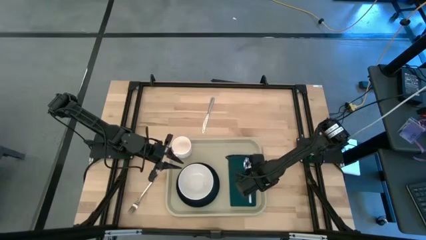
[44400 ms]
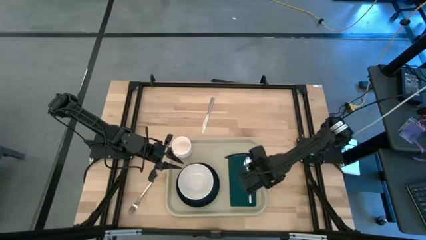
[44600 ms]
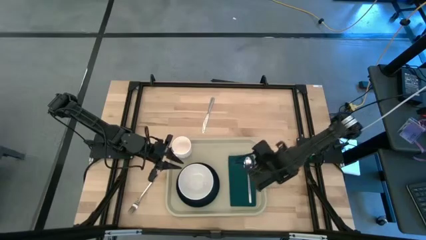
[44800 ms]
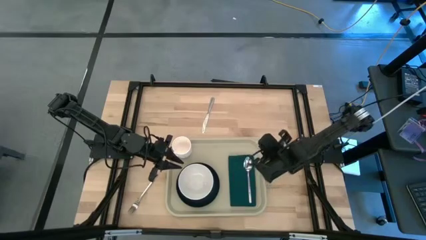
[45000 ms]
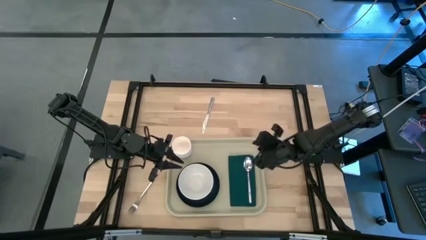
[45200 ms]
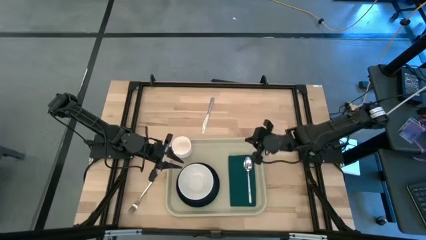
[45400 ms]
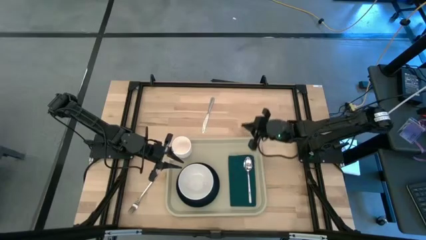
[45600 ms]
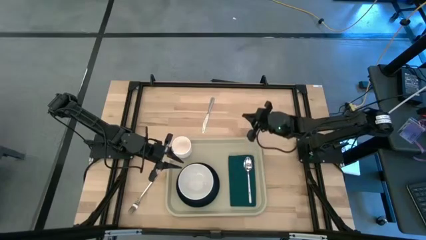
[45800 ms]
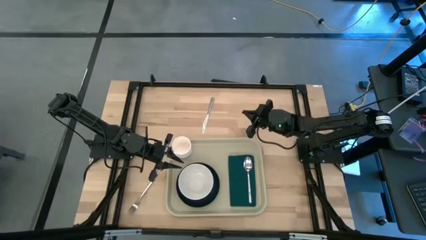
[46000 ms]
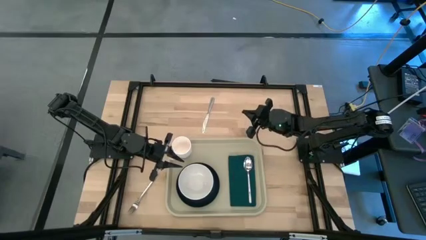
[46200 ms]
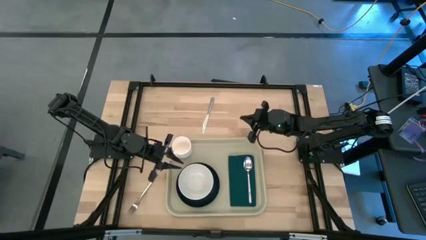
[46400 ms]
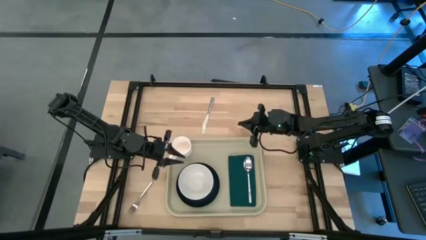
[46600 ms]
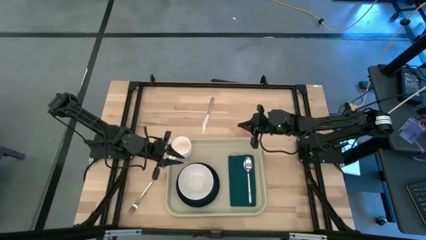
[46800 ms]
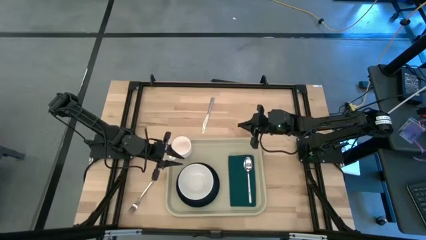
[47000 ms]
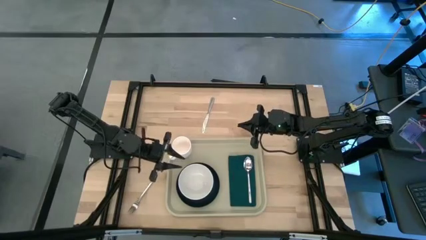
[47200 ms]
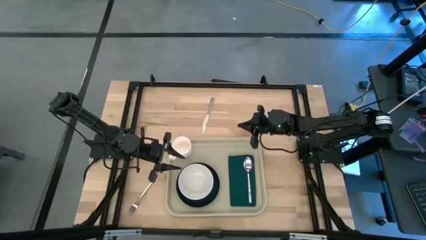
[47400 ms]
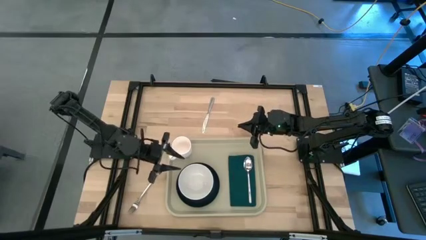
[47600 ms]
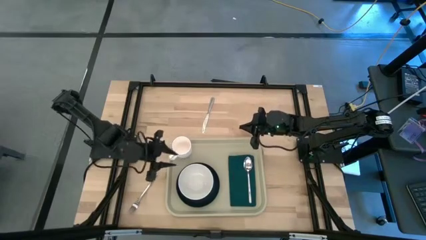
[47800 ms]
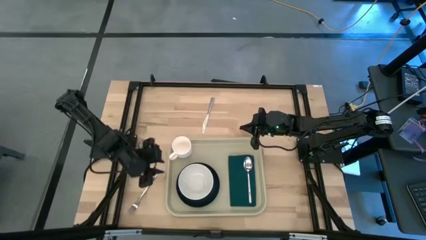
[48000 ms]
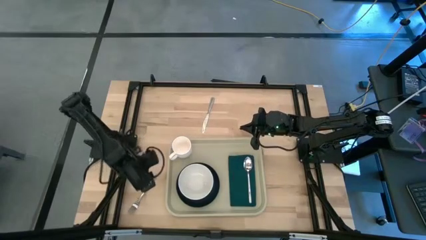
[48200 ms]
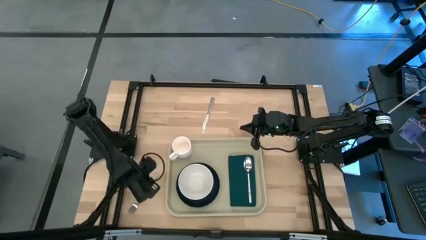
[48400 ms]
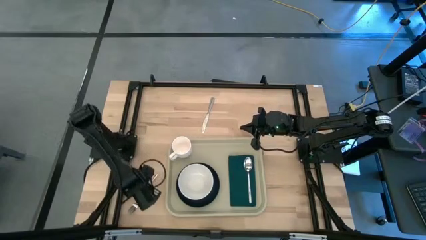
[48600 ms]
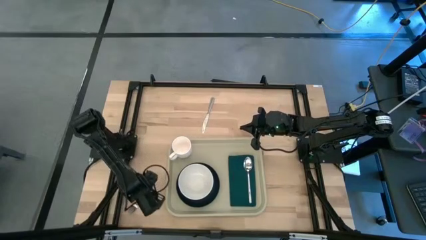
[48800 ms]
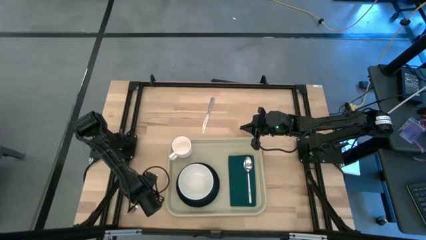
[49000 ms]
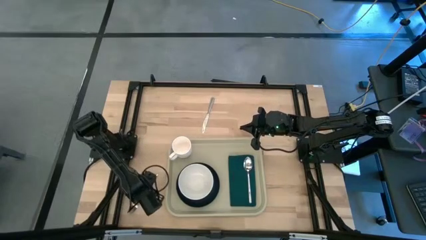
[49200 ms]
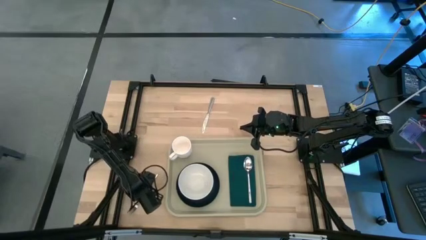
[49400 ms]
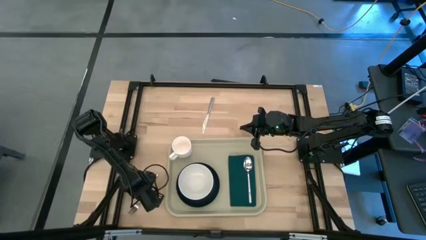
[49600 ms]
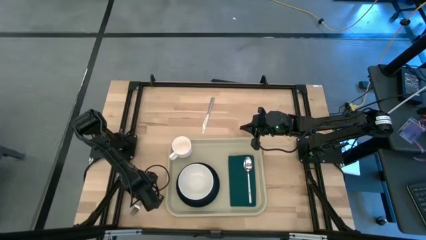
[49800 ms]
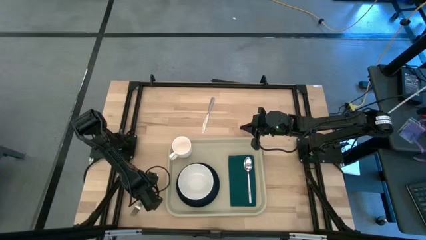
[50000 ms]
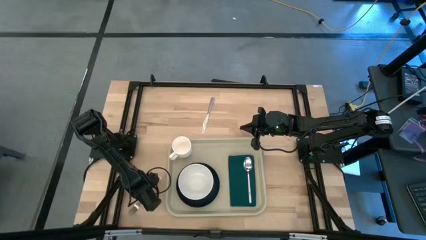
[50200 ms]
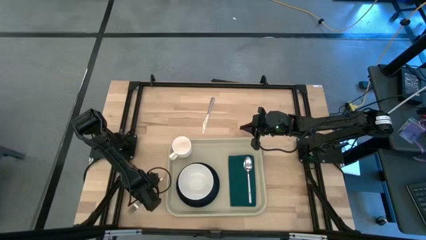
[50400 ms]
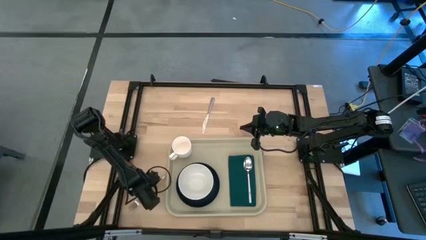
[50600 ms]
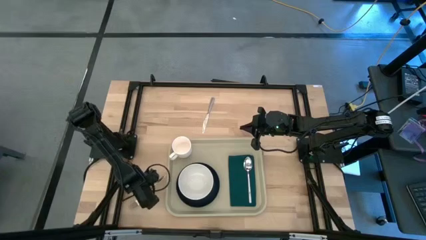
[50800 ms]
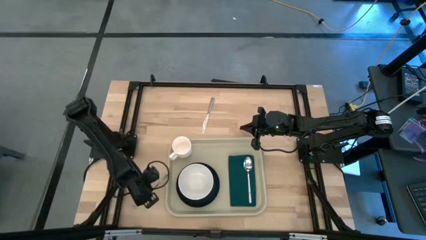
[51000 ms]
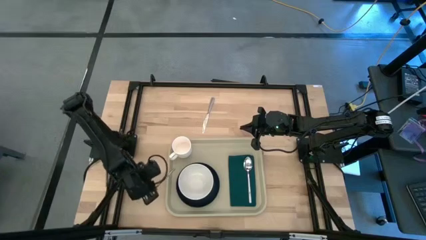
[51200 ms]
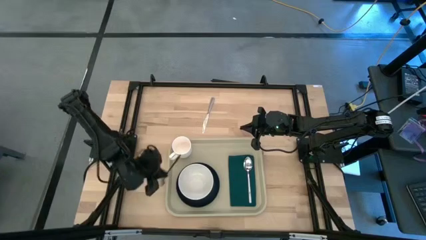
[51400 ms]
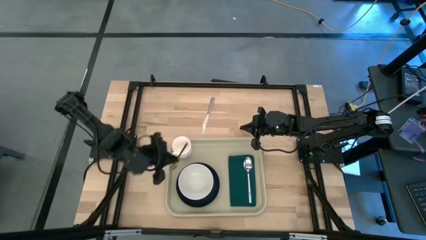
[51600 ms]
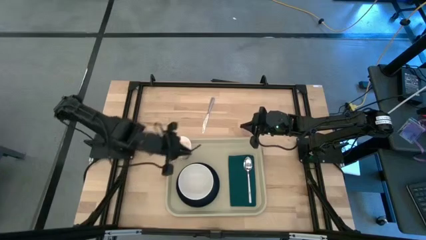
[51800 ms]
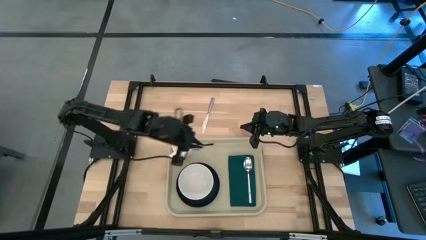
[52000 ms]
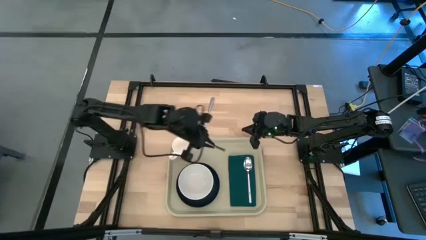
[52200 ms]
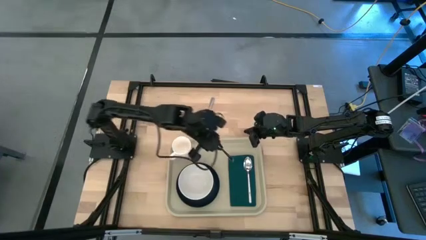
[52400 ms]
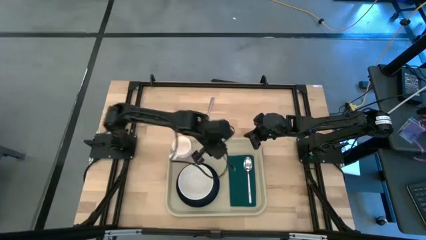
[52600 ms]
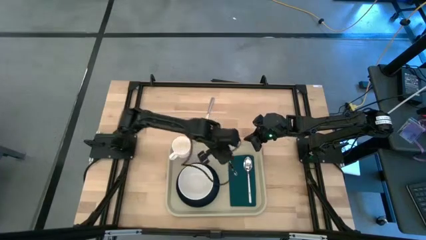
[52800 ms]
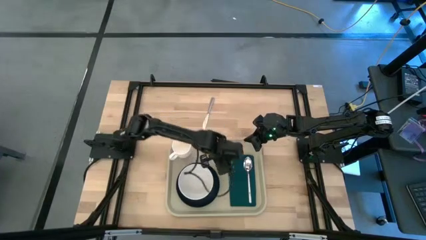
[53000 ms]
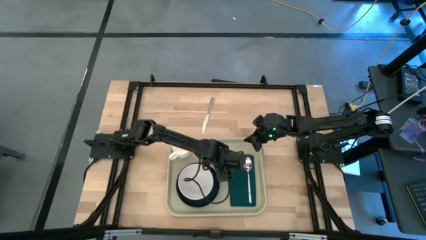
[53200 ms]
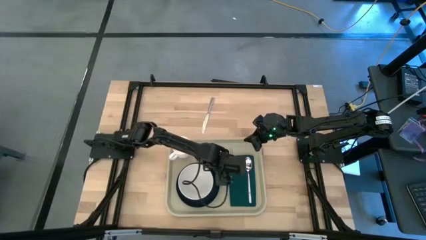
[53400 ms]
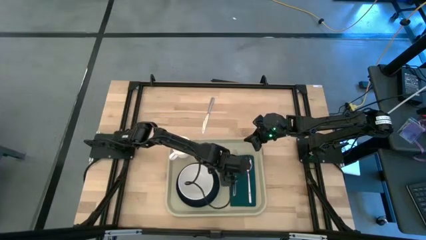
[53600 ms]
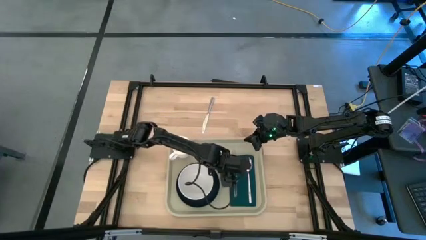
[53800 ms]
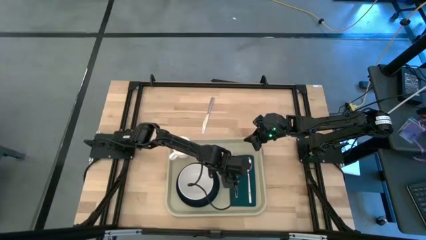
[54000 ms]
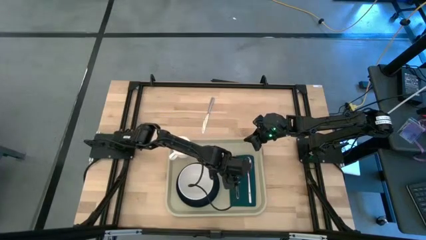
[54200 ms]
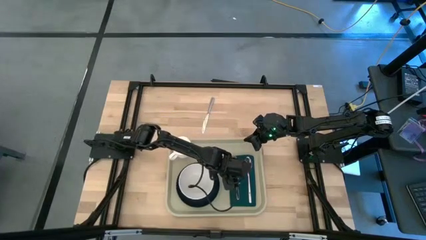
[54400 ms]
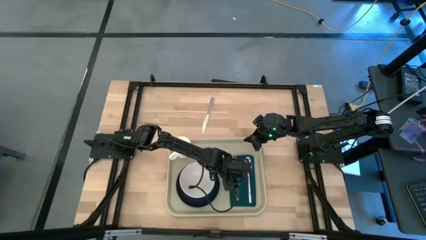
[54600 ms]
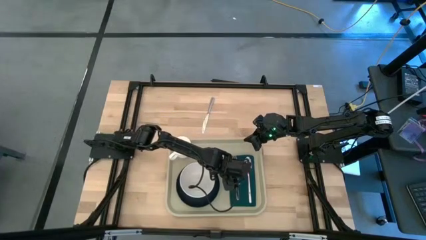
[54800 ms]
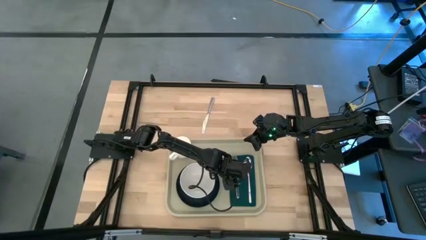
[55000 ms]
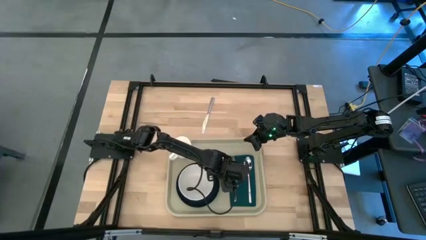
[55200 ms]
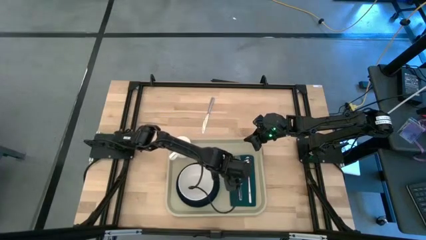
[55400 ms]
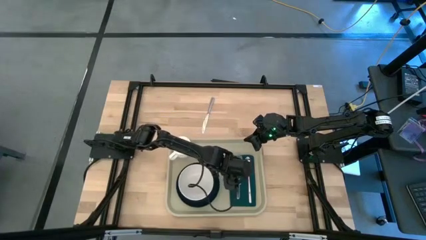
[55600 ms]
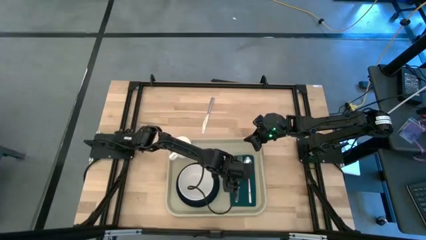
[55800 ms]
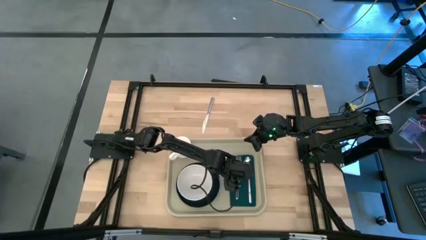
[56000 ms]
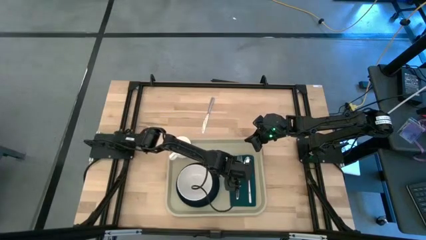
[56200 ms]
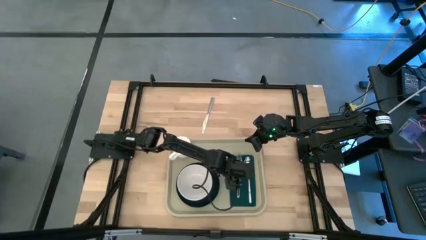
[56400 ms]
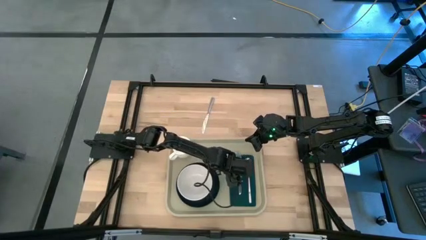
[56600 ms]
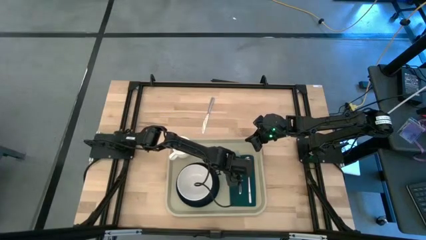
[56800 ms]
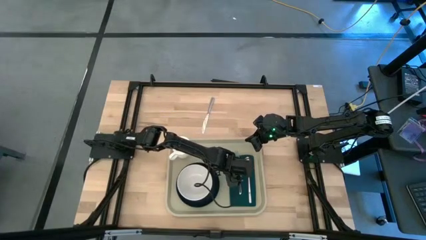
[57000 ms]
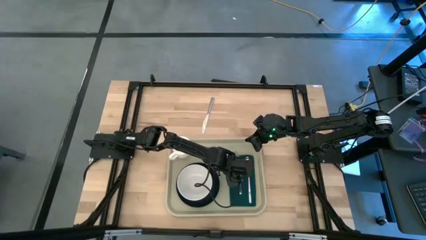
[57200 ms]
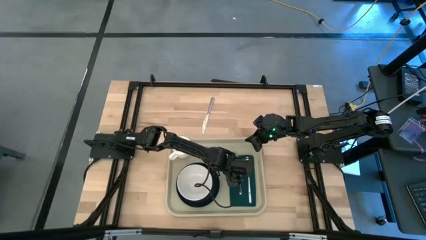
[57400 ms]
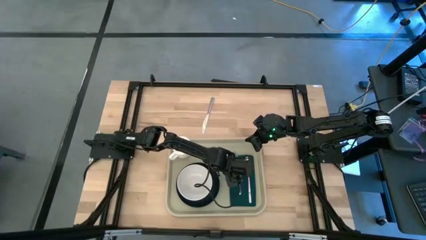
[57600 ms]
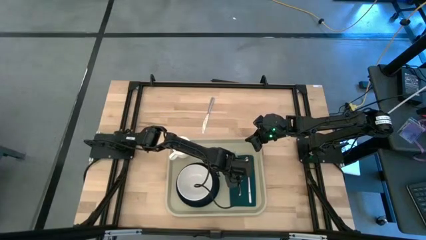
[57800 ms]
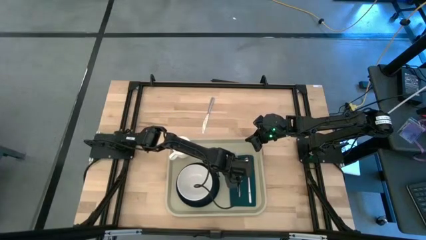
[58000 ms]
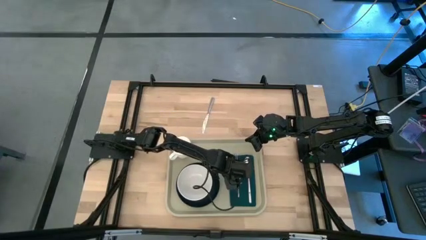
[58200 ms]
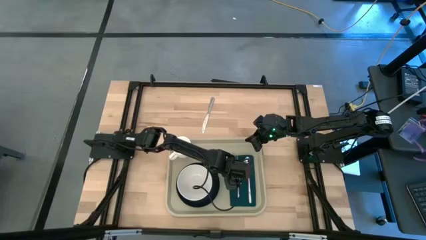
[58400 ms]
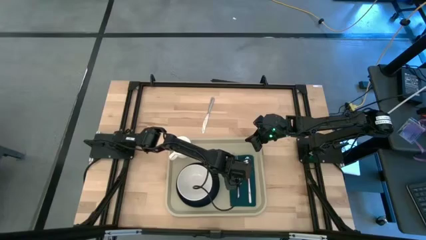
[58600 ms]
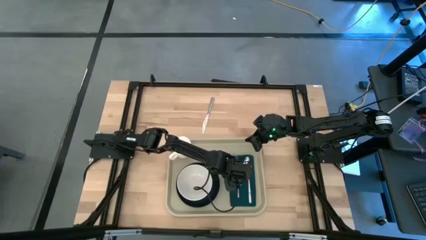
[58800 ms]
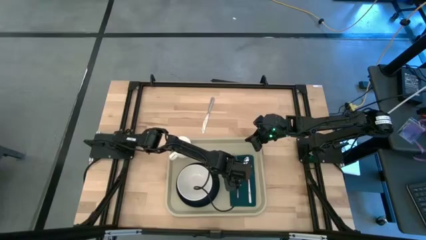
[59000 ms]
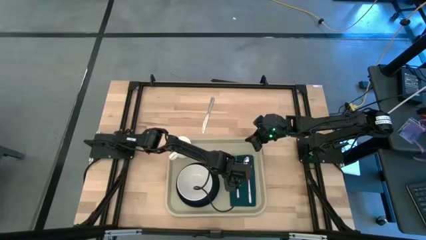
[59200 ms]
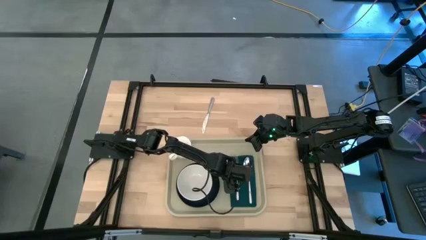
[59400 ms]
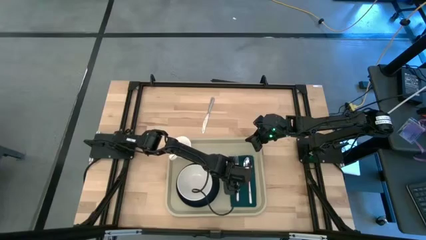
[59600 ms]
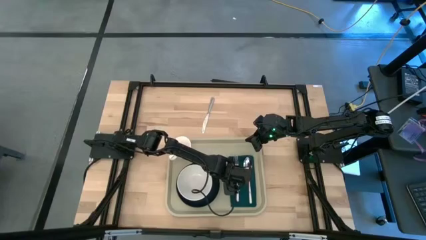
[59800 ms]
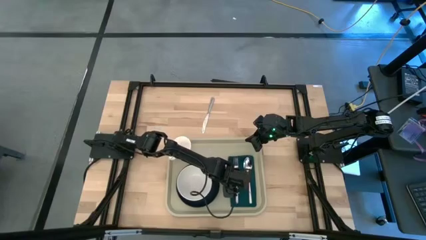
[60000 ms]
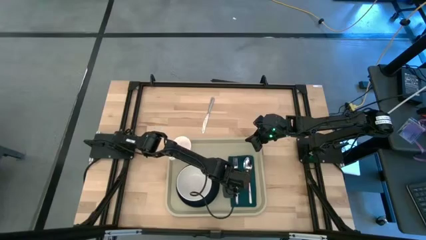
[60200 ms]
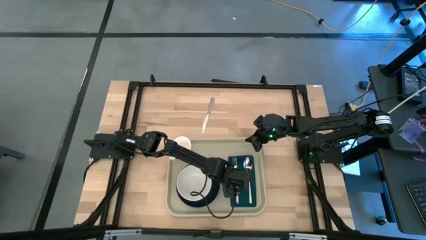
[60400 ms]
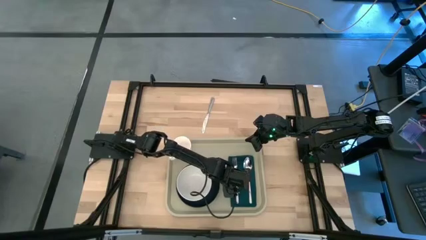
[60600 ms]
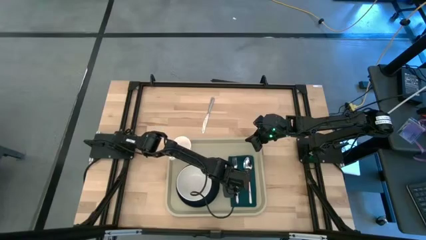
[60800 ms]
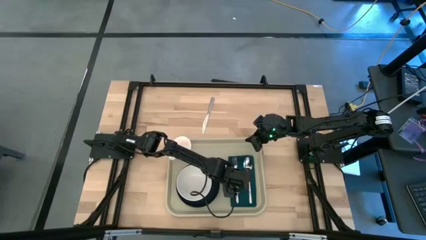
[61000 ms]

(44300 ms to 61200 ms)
Task: Set up tray
Put the silver fork on the green napkin to the left of the silver spoon
